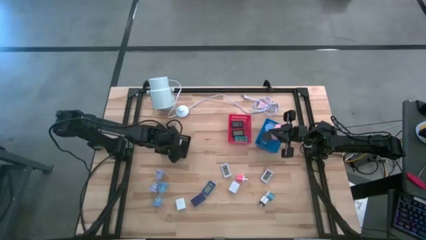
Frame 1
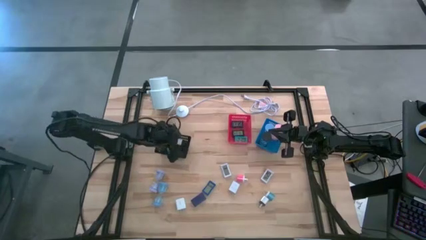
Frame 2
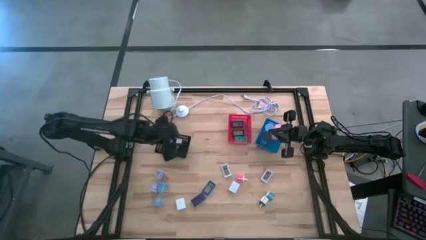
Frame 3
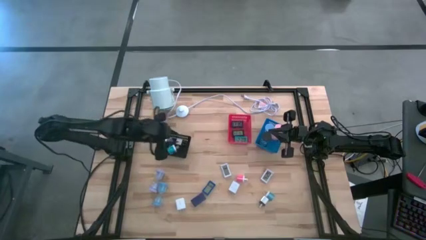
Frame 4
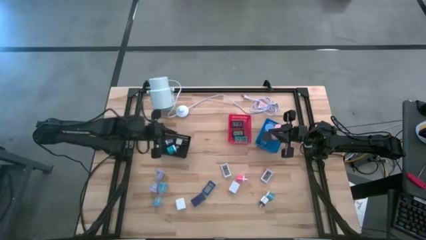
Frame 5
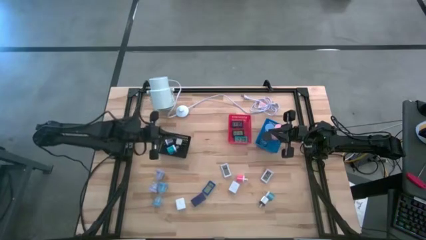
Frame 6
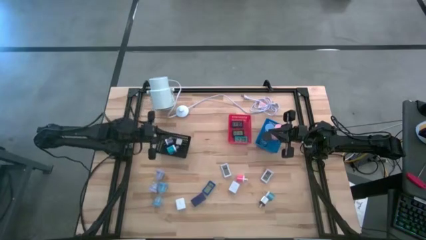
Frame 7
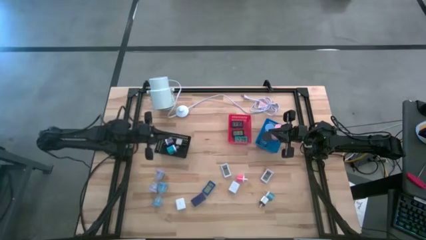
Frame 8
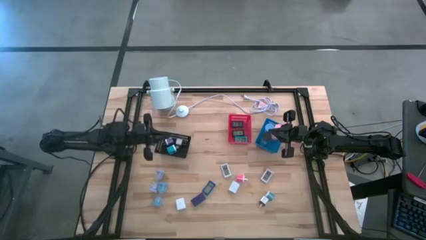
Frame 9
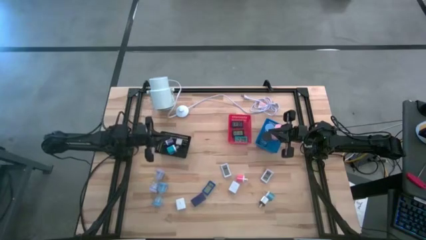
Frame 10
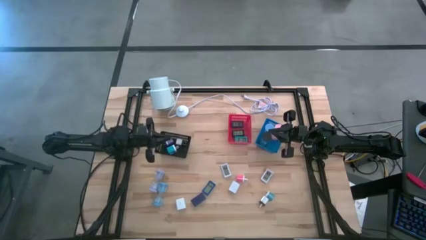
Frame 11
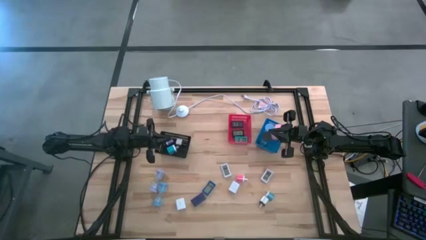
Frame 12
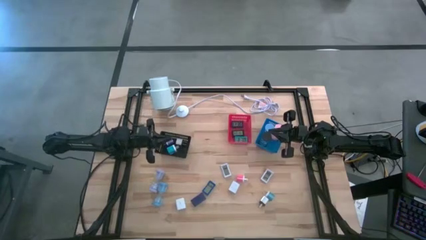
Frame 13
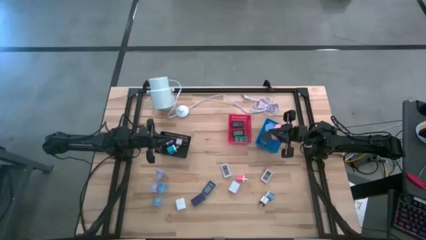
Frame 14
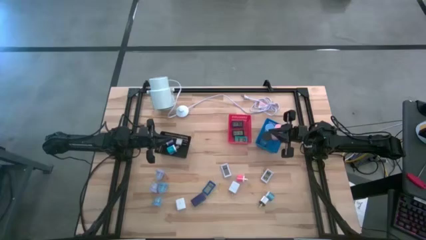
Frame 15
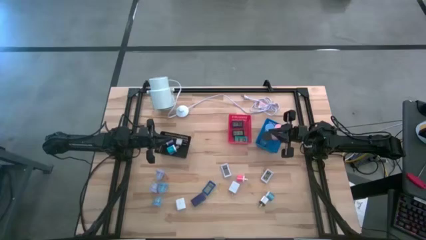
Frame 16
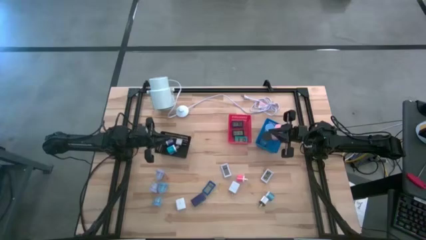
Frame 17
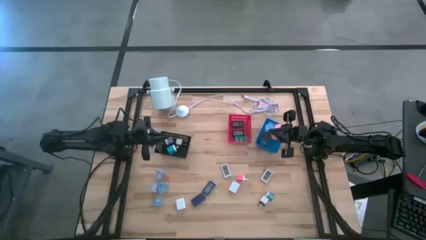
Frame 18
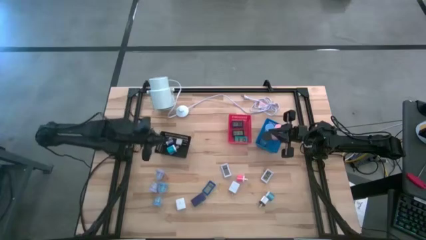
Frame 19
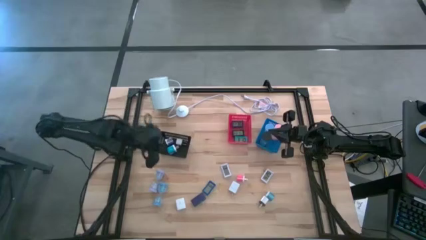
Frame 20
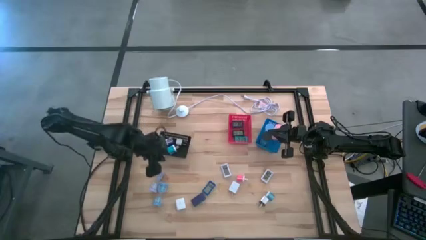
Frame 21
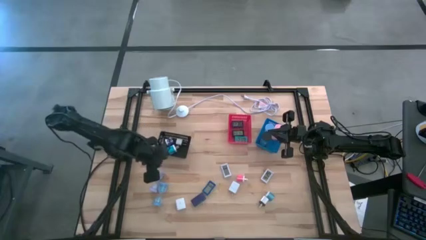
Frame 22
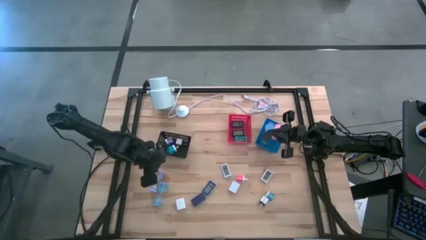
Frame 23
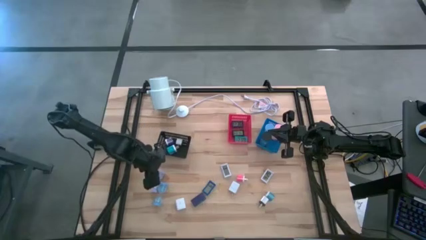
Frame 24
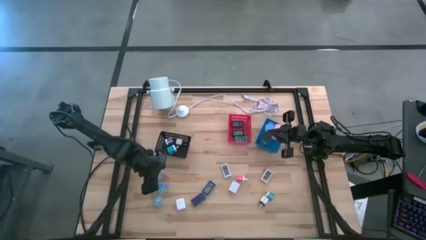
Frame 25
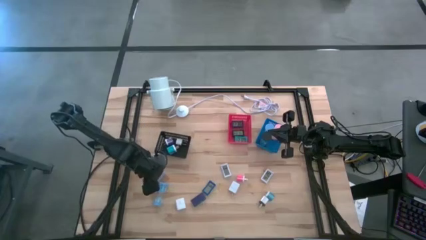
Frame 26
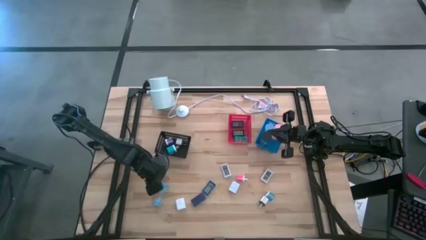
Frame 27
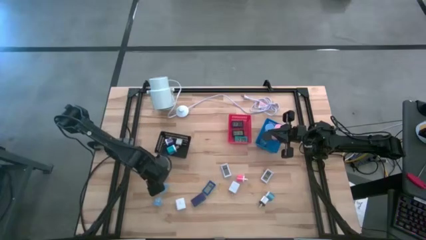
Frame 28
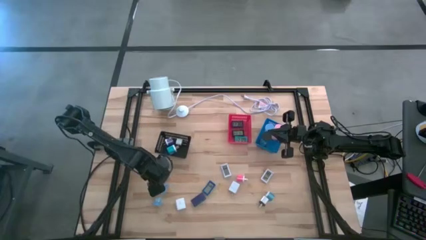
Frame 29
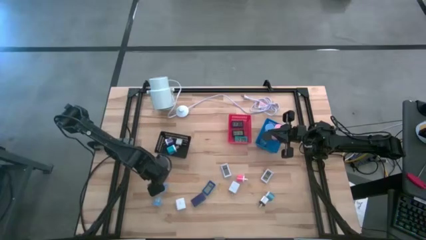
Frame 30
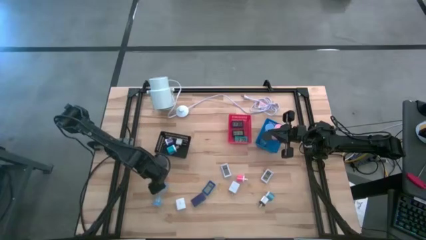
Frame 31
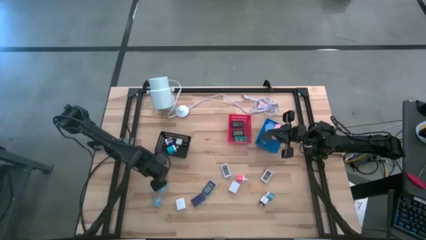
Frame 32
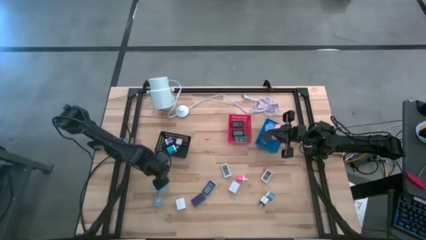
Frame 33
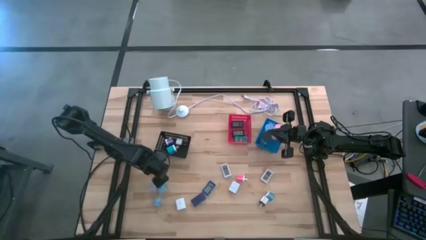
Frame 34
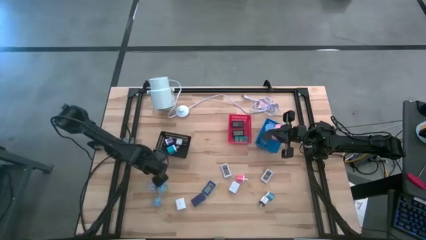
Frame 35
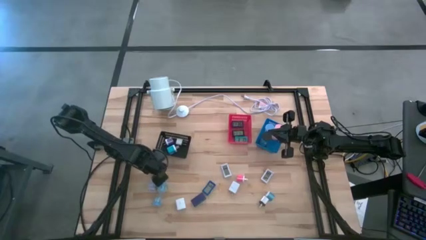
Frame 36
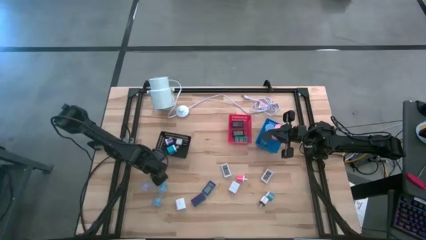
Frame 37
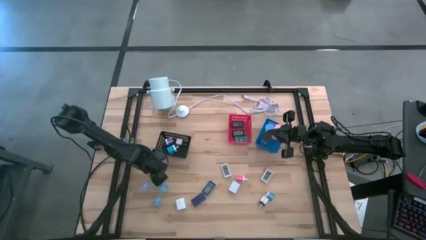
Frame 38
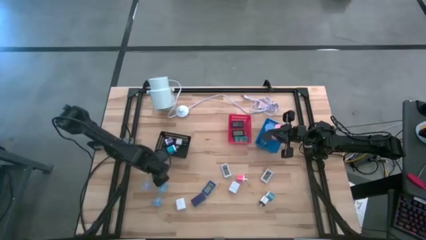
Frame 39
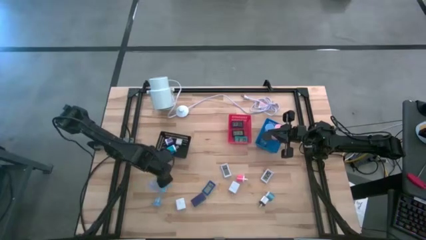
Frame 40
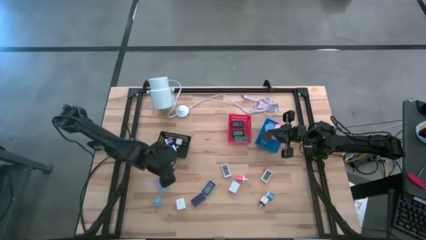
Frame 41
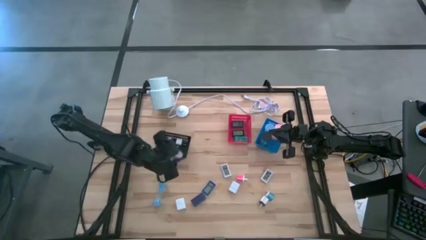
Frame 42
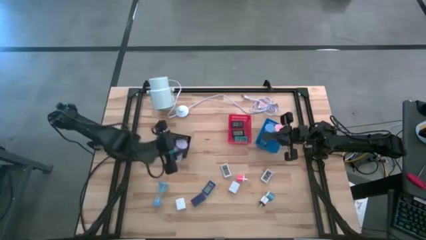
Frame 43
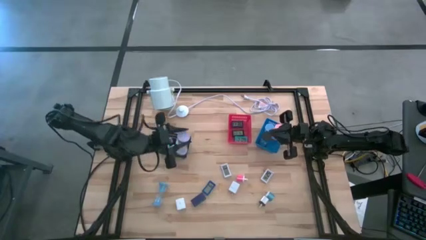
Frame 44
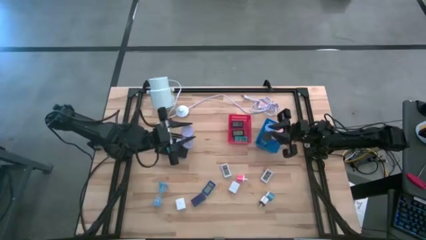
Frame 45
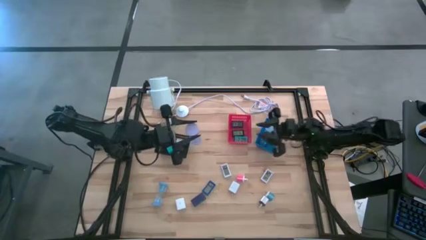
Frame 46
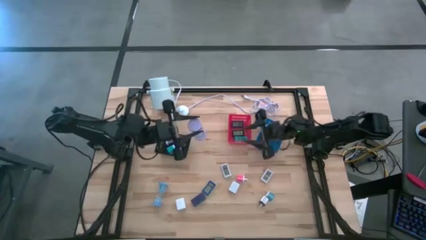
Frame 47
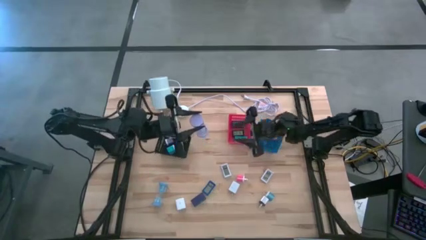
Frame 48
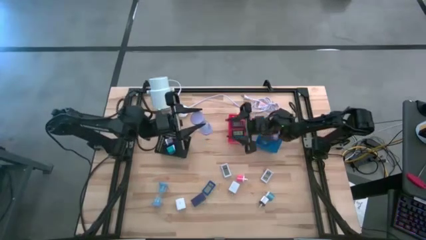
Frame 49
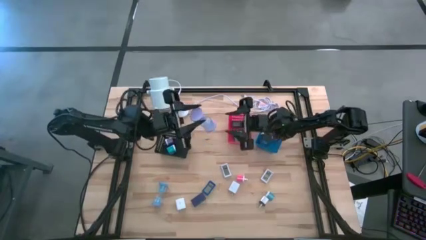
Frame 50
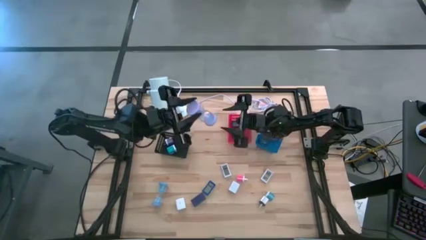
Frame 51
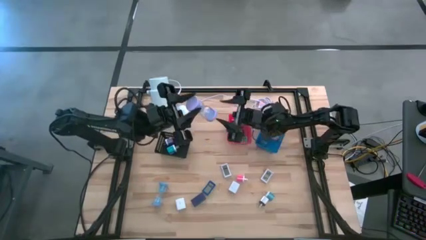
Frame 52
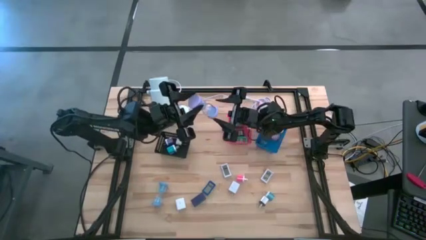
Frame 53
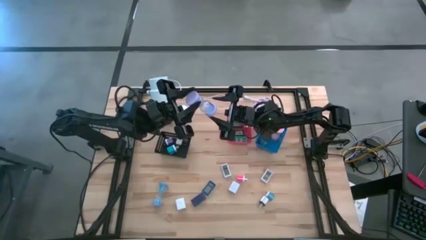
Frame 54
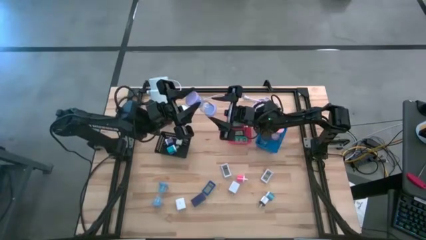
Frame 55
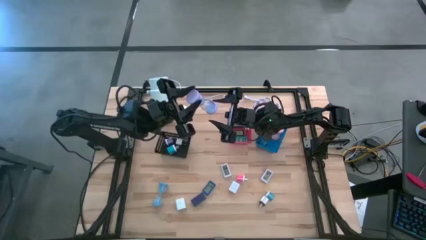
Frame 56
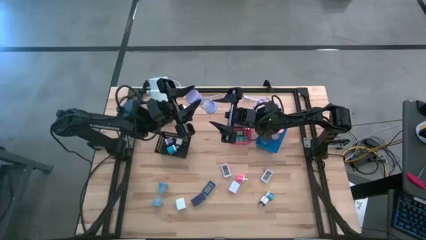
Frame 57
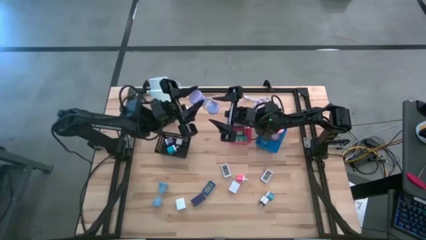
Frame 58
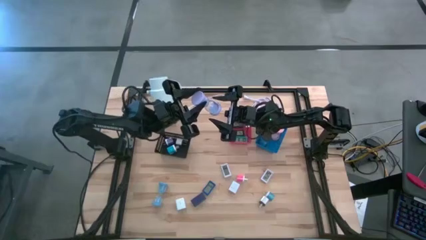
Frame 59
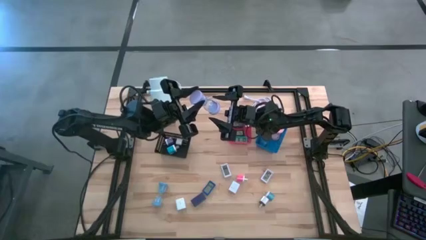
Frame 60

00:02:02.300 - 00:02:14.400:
Task: Pick & Place Office items
Put the violet hourglass into the blue bin

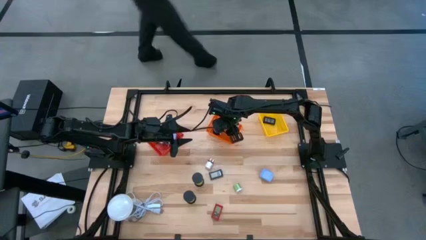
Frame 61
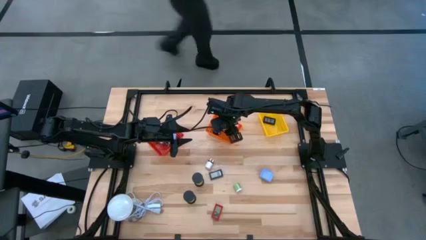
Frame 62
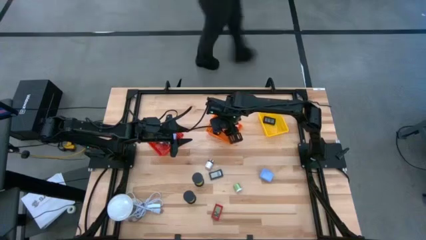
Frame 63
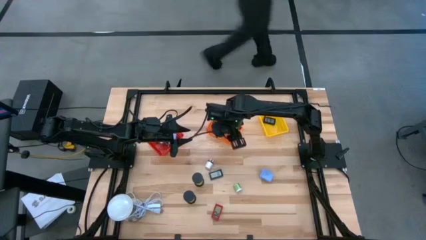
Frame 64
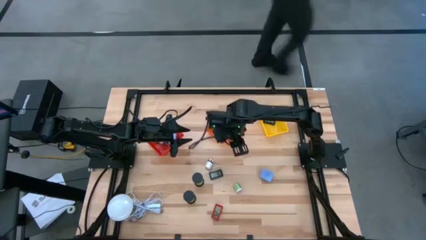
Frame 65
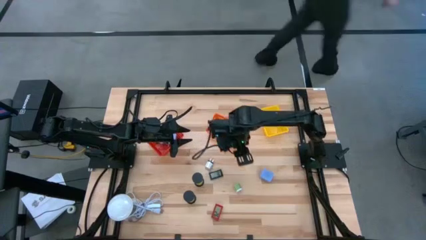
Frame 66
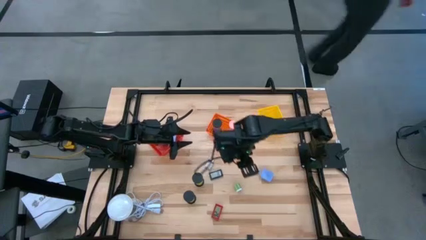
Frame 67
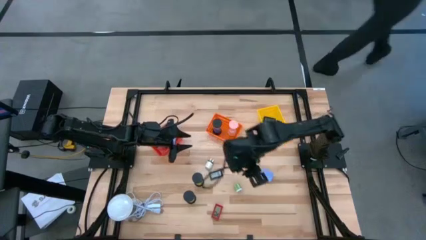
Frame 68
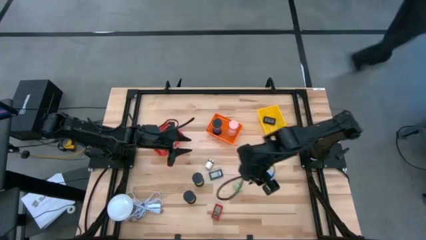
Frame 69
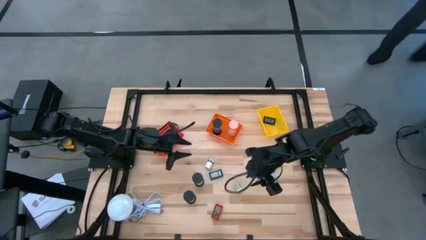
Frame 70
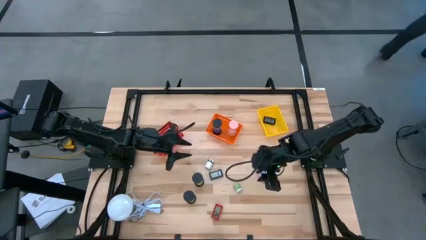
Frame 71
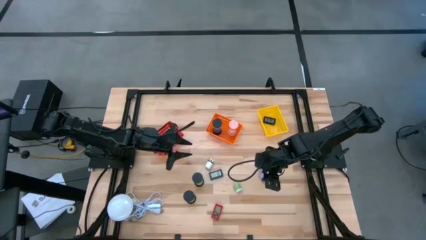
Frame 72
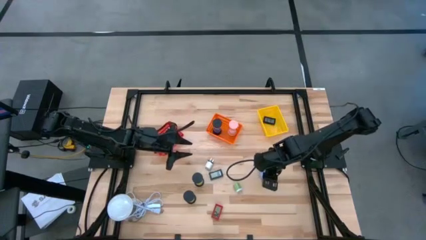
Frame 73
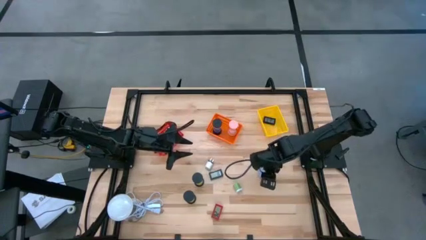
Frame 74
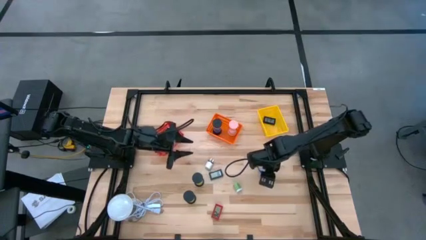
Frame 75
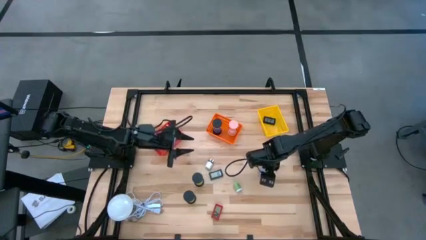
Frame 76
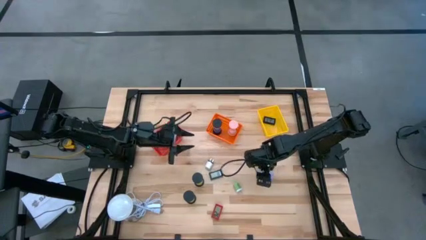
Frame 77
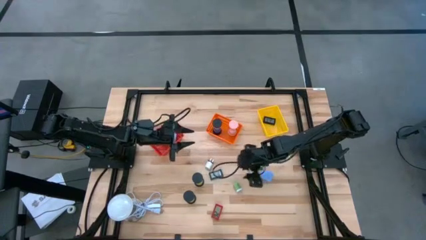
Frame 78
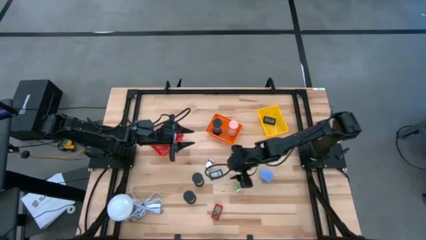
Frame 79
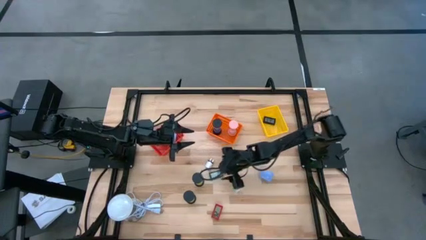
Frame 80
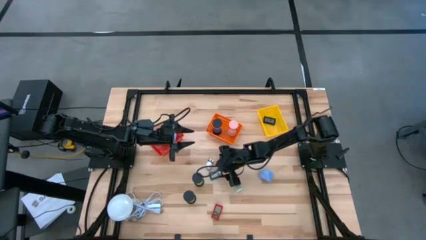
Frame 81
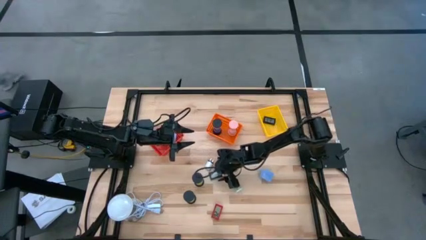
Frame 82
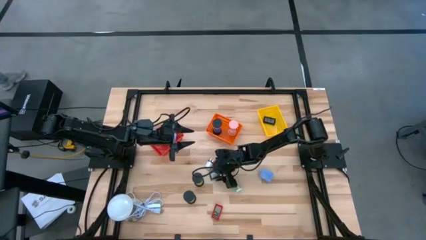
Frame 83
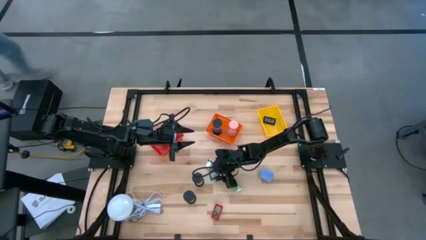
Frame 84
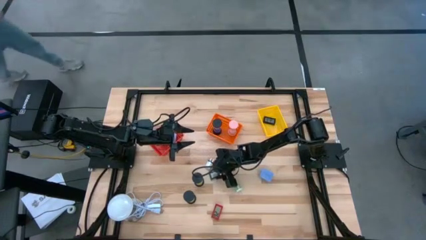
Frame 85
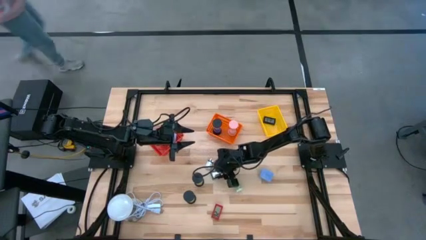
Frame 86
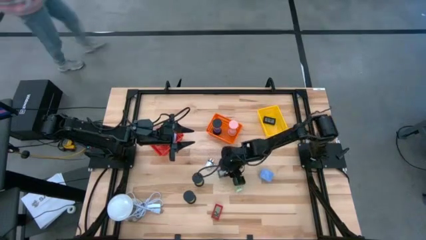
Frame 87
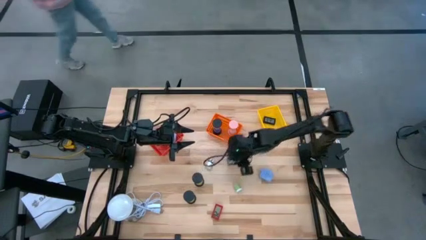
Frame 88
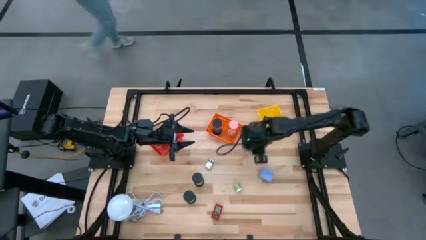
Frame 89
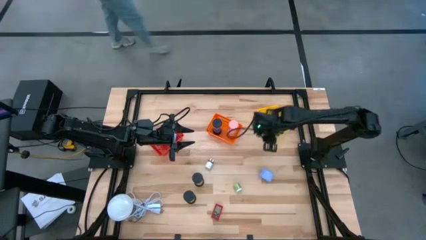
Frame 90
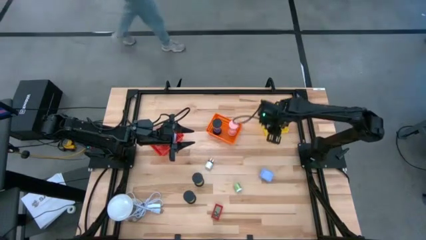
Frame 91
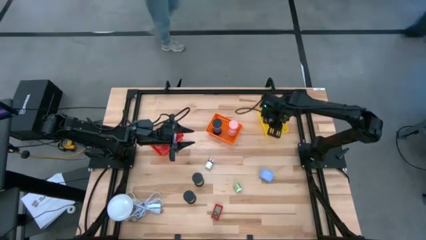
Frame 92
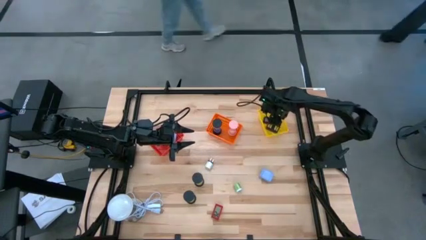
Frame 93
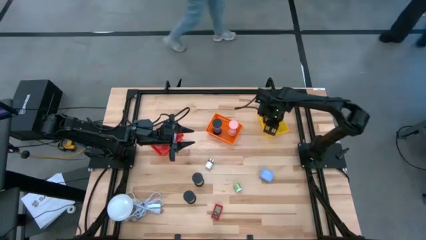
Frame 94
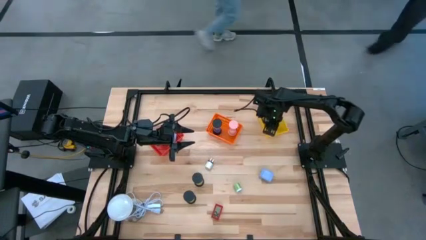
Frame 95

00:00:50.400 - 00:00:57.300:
Task: Pick & Place Office items
Put the black digital timer into the yellow basket
